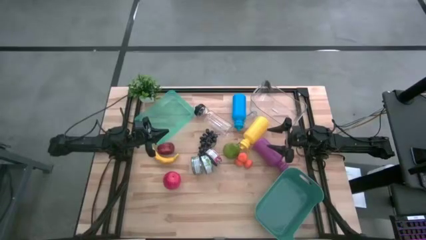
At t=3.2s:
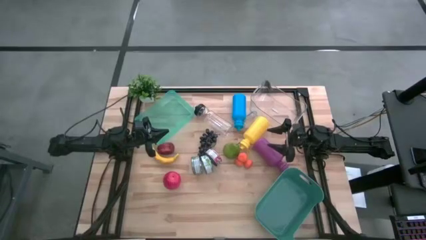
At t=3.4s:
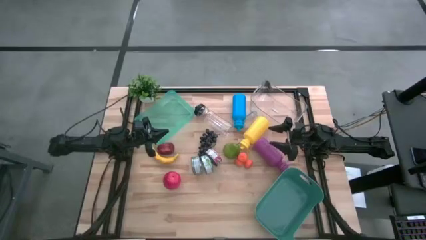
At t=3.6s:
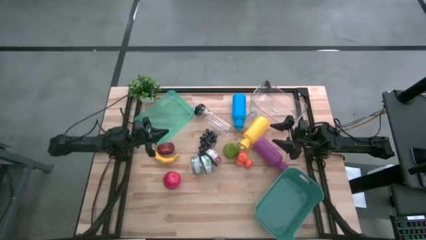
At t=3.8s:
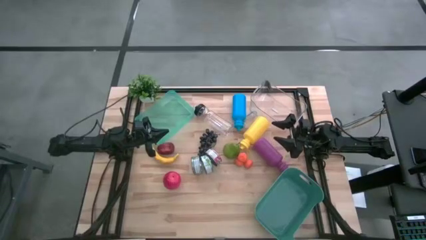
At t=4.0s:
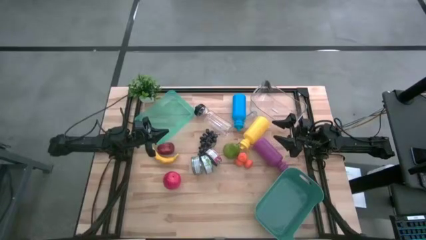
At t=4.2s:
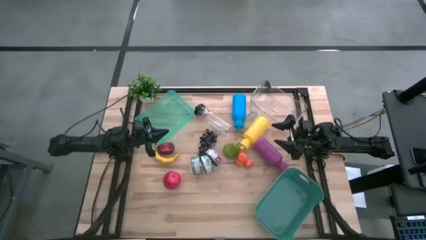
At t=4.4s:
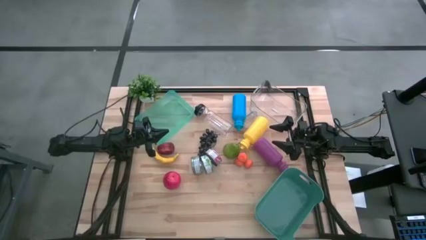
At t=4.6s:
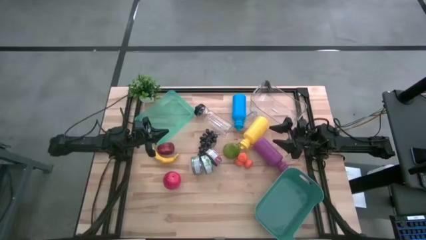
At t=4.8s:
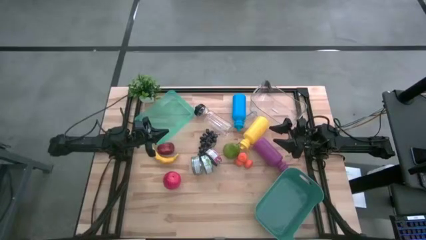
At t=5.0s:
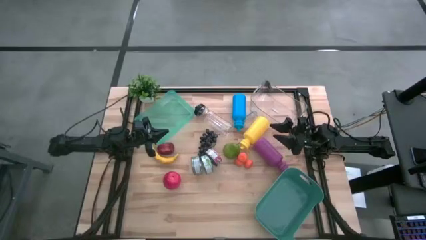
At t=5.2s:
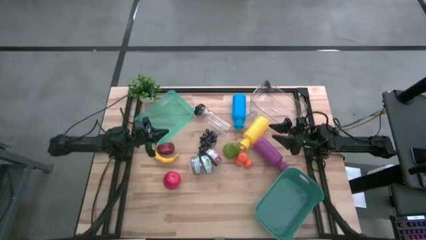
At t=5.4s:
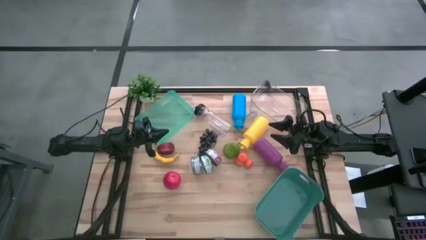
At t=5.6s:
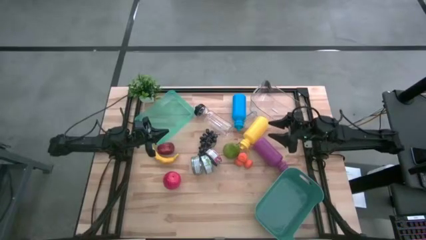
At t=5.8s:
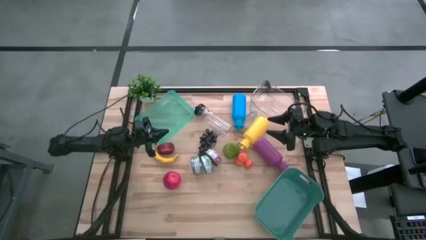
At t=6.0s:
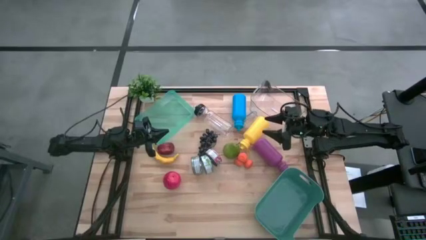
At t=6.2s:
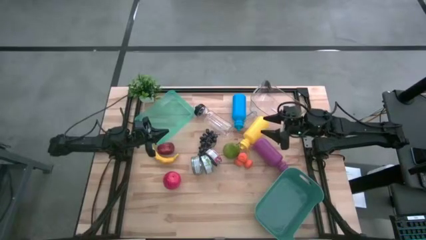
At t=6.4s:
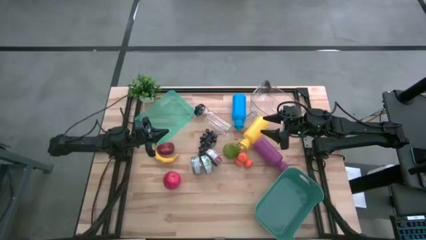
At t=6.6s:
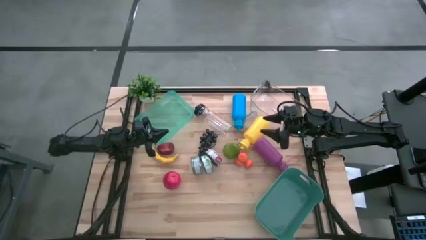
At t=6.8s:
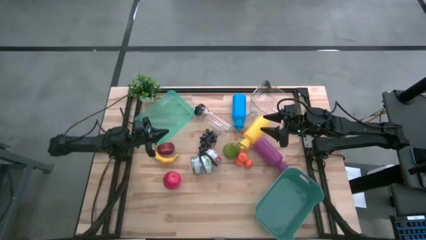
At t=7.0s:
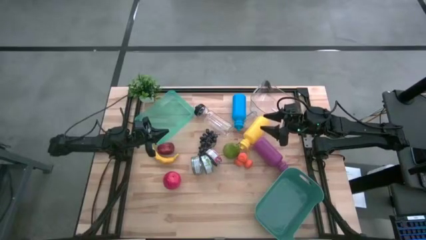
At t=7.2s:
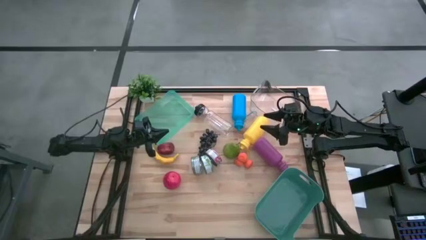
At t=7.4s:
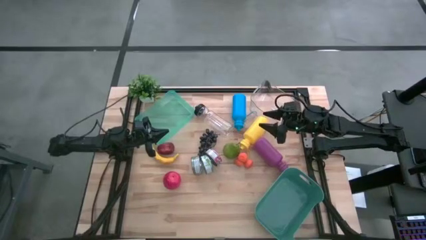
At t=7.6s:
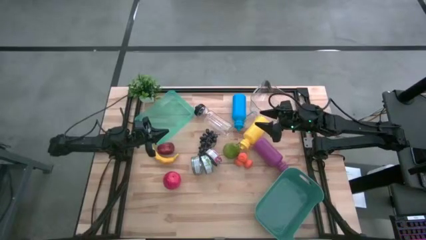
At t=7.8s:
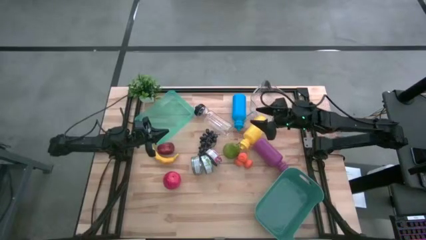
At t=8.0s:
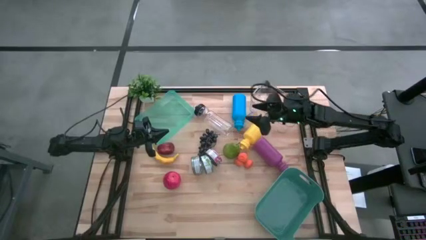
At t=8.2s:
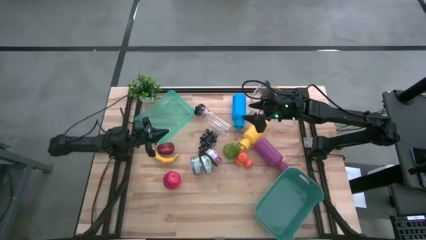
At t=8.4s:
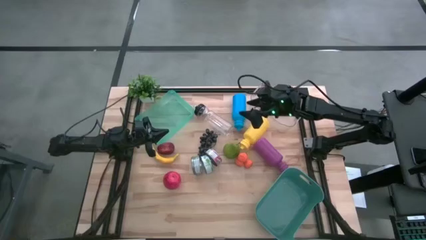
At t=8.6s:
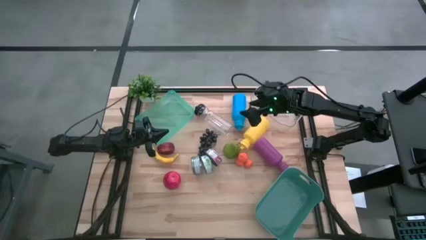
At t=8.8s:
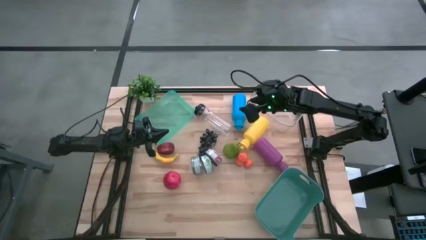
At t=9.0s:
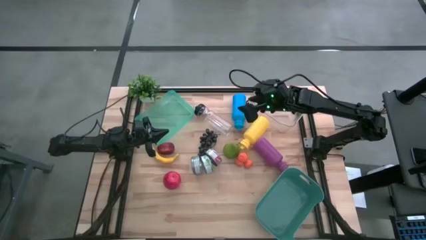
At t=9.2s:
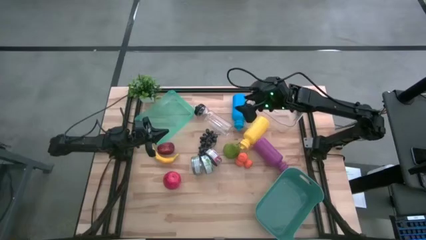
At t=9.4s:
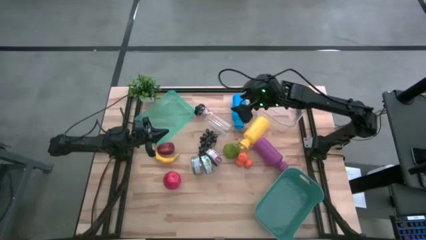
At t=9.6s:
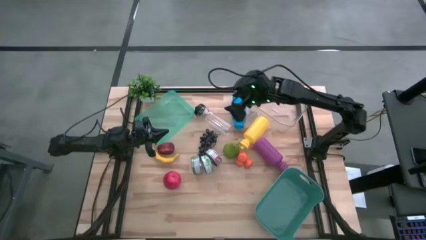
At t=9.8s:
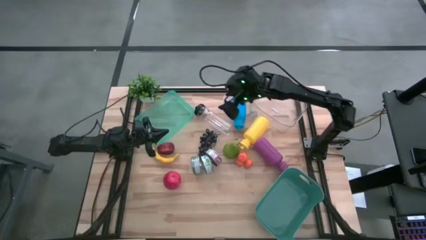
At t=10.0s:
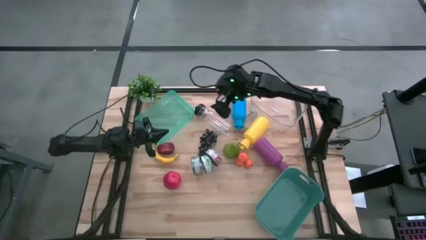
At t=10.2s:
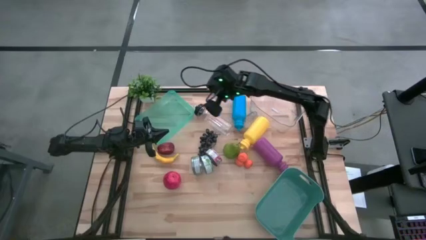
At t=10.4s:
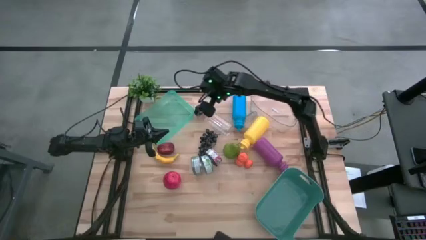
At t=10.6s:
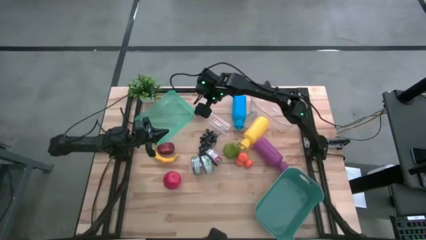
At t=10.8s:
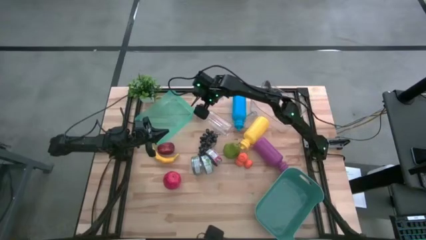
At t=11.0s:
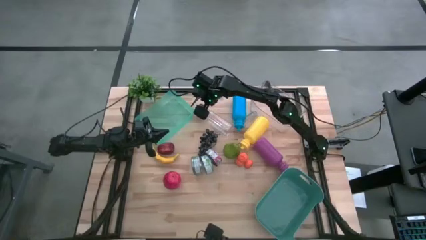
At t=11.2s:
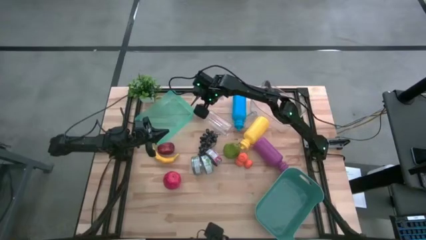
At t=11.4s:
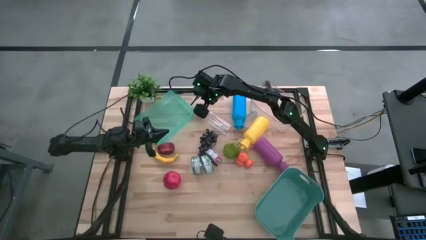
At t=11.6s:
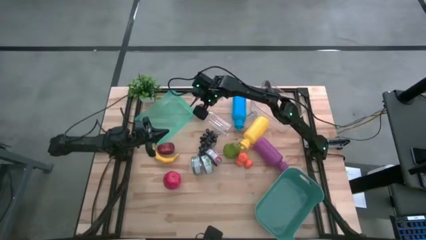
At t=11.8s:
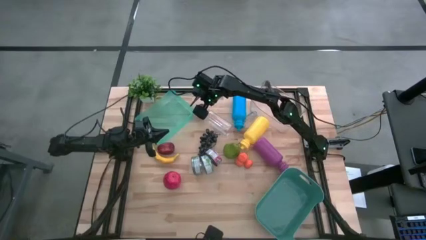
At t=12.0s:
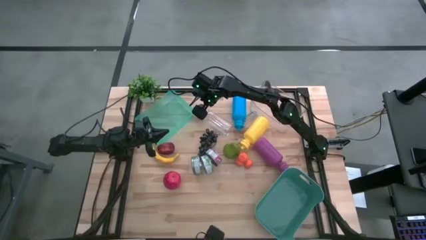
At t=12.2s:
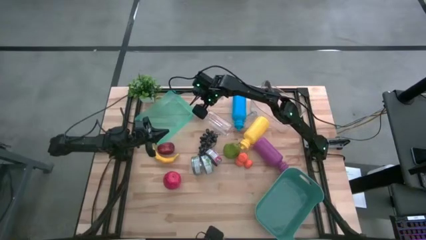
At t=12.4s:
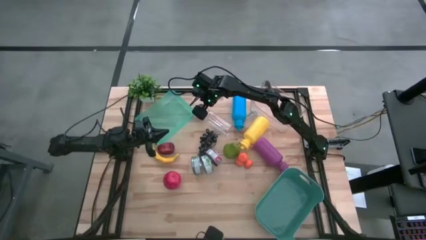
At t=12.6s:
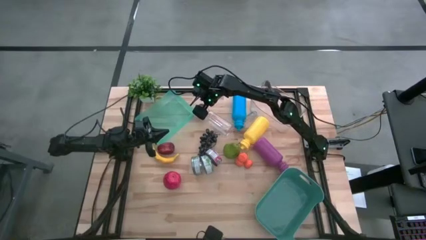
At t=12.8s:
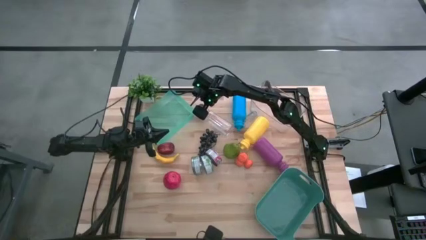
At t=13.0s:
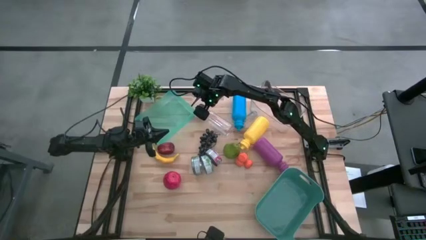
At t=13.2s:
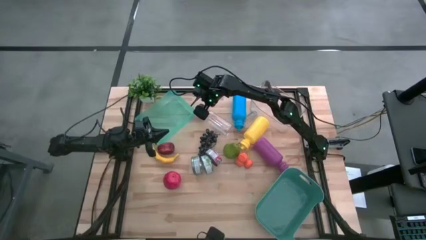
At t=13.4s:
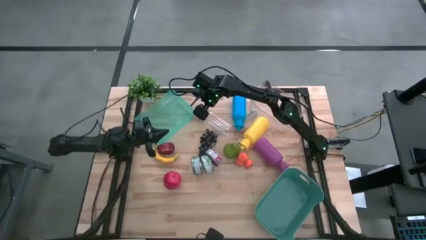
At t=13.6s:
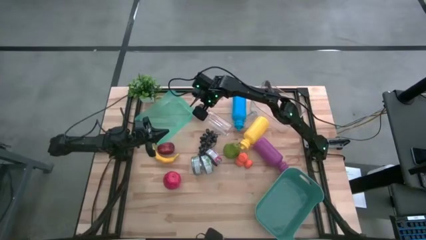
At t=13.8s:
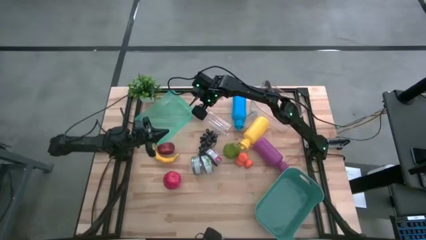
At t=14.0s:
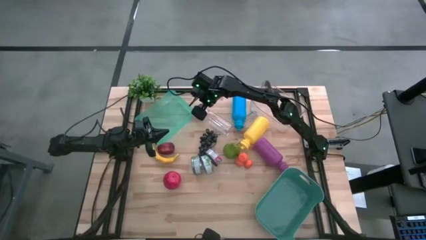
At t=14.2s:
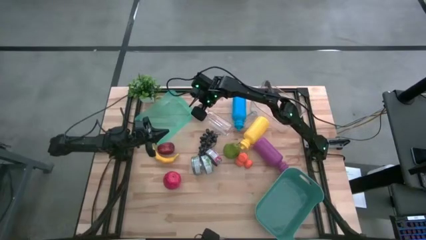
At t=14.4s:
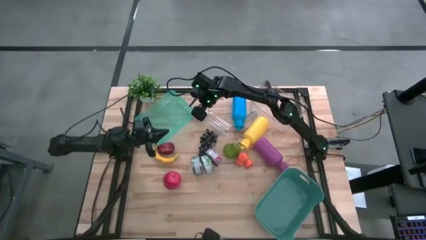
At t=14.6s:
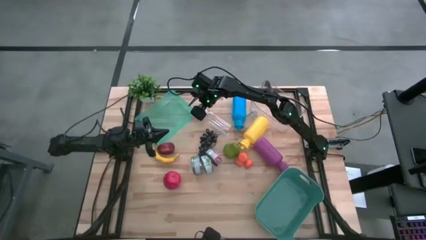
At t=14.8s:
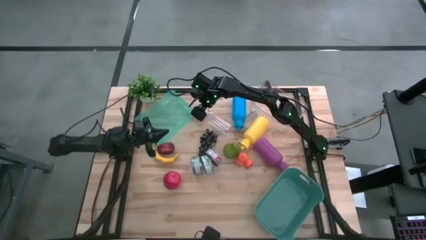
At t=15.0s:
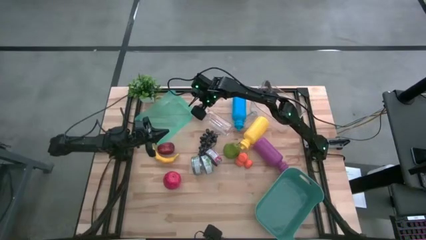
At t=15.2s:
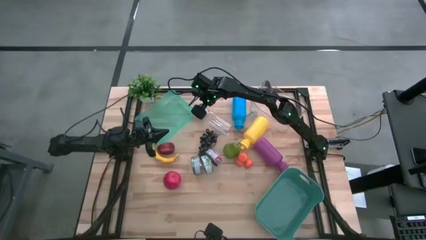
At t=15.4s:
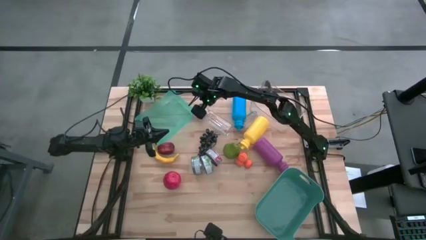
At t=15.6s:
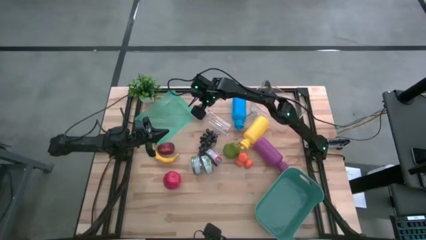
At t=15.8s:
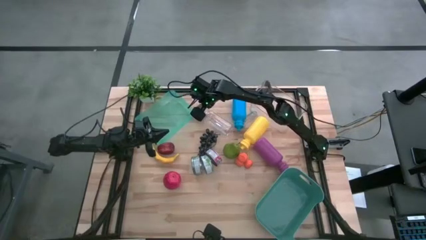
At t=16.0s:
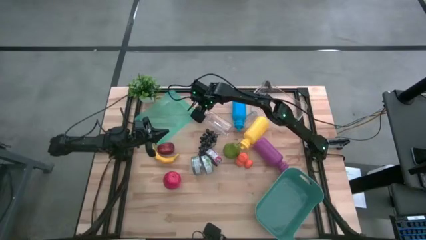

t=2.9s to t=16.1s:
Task: Pick & Place Food Item
Put the transparent water bottle into the transparent bin
